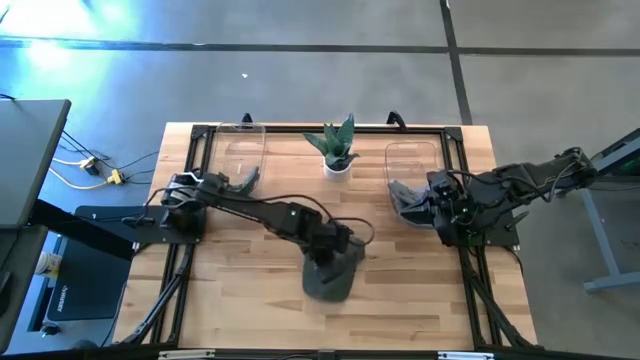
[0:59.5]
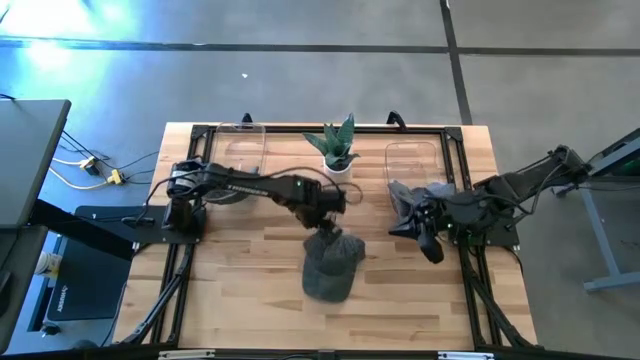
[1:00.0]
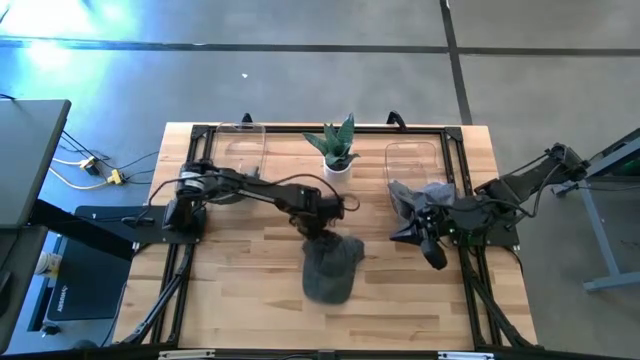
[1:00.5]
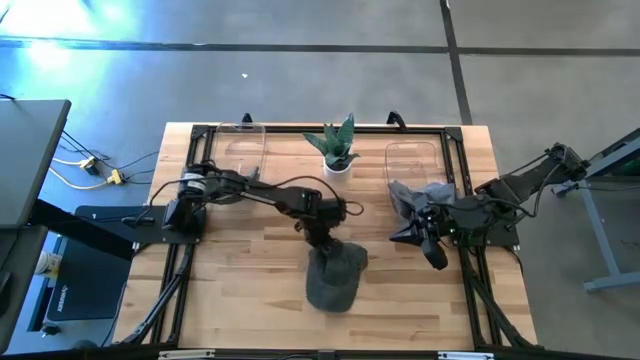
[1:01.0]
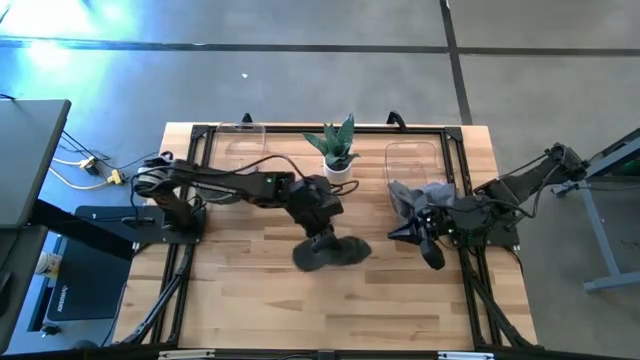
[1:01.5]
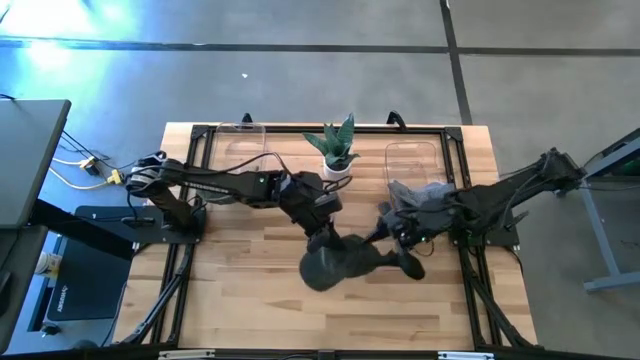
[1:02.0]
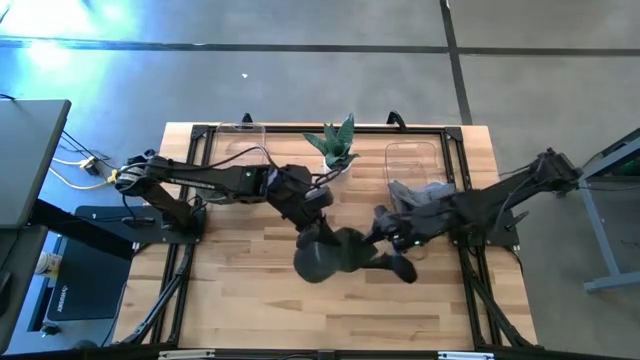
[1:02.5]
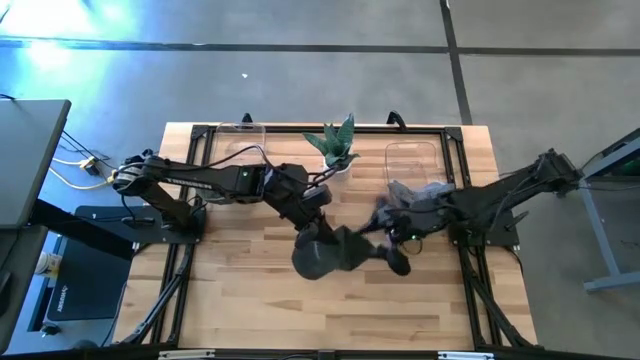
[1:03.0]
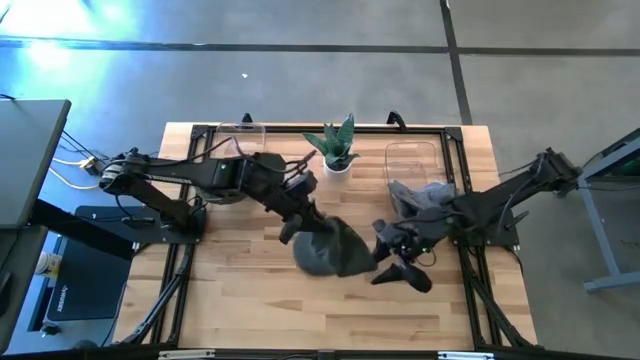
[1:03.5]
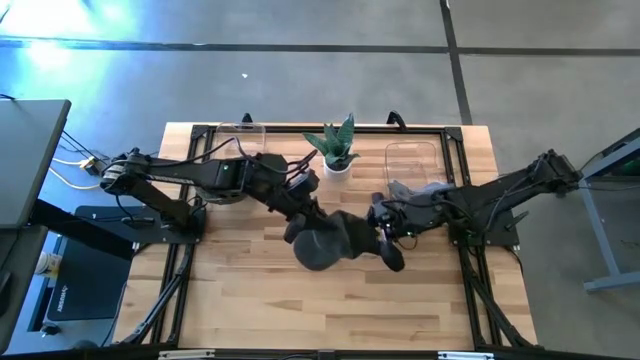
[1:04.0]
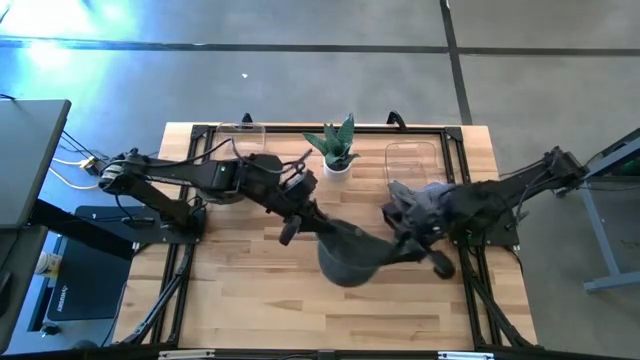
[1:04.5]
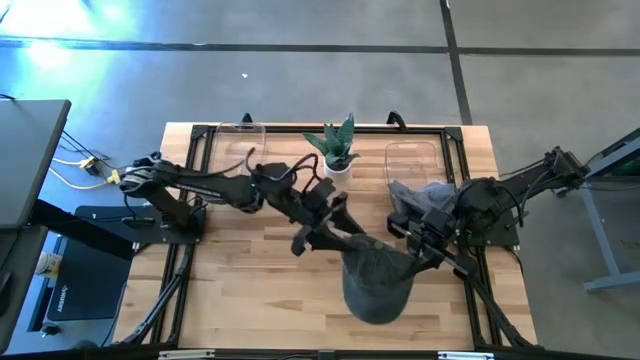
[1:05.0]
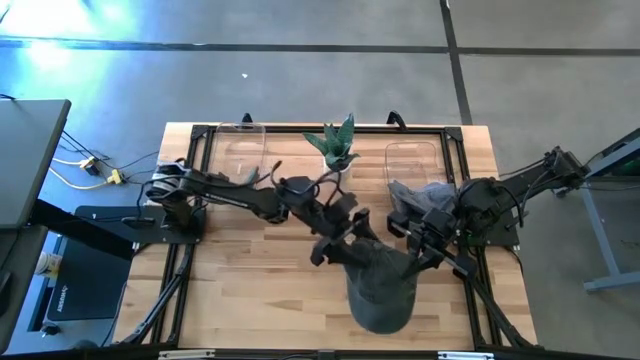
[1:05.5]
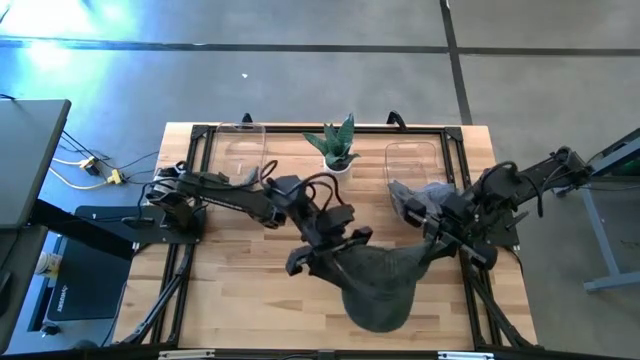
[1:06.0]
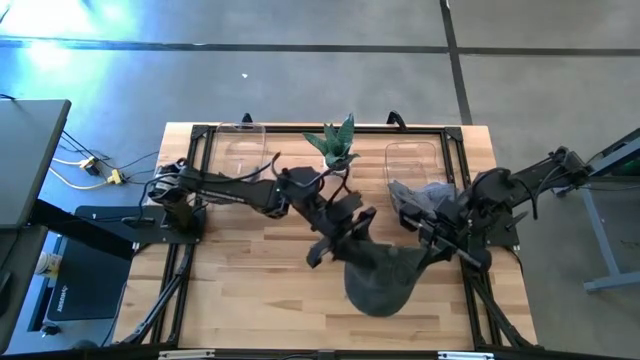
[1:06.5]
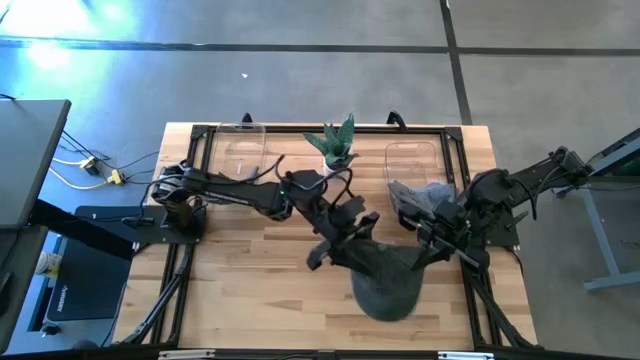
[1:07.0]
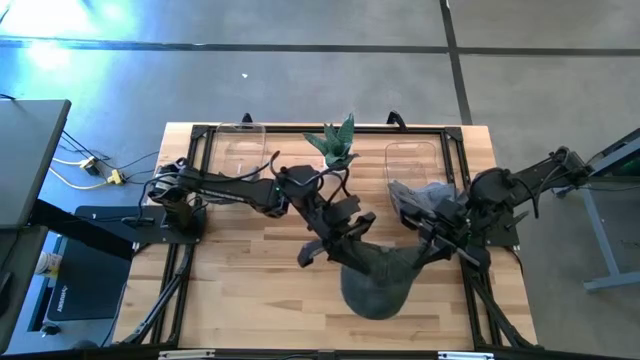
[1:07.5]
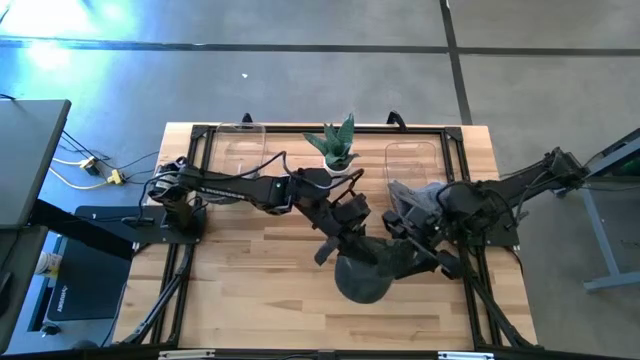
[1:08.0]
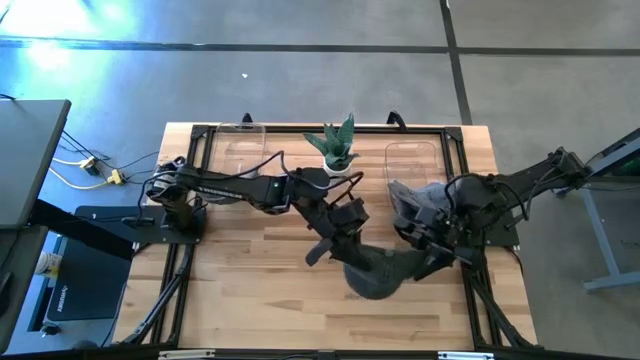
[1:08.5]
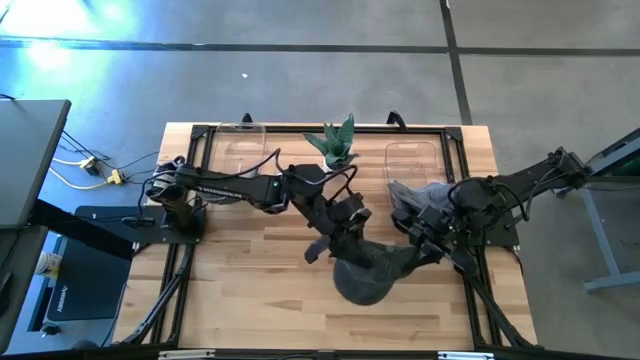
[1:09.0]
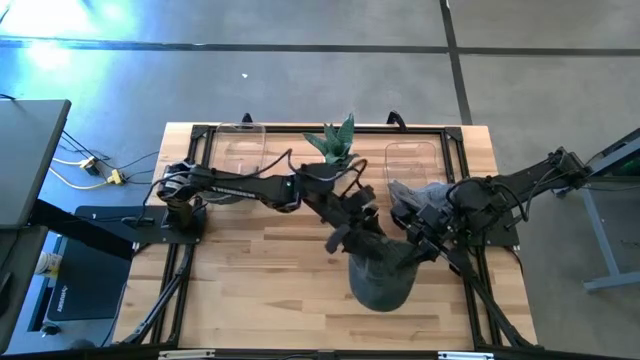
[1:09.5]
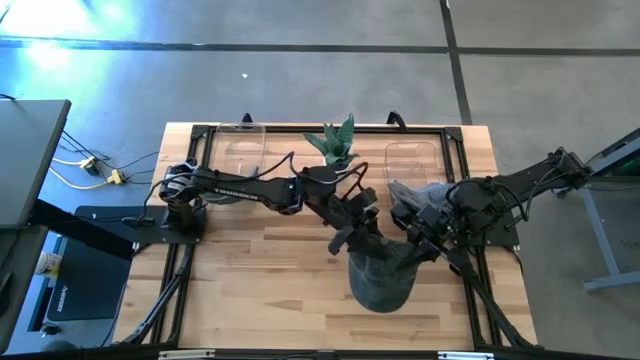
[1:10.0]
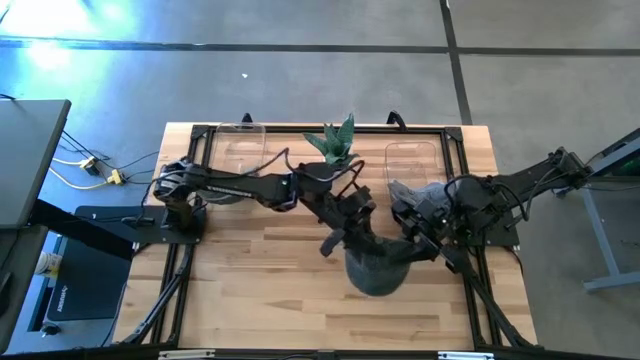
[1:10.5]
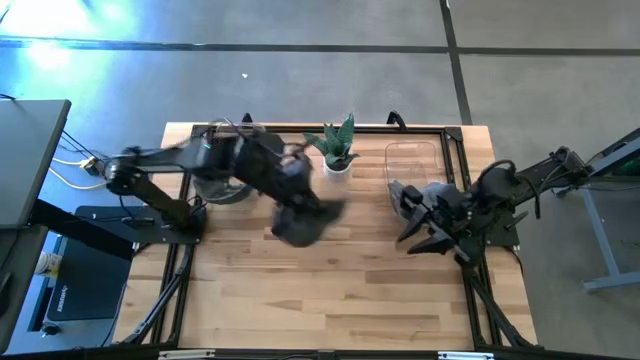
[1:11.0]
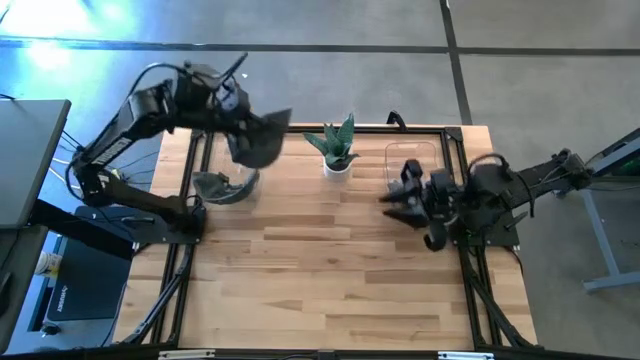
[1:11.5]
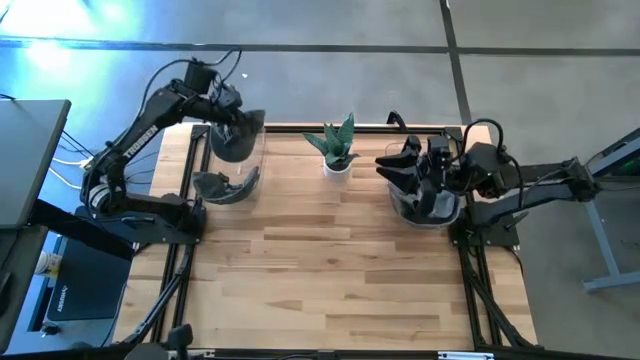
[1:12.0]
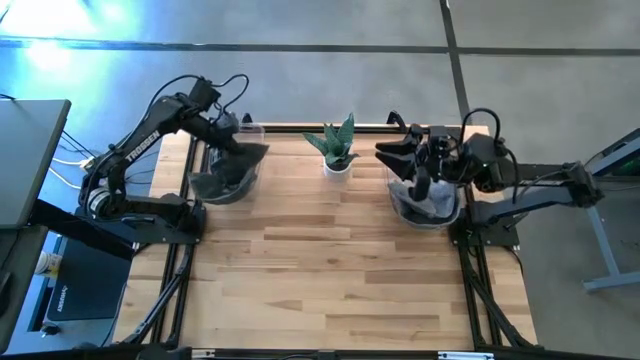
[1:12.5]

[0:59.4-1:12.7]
Task: Pick & Place hat
Put the green cap into the left bin

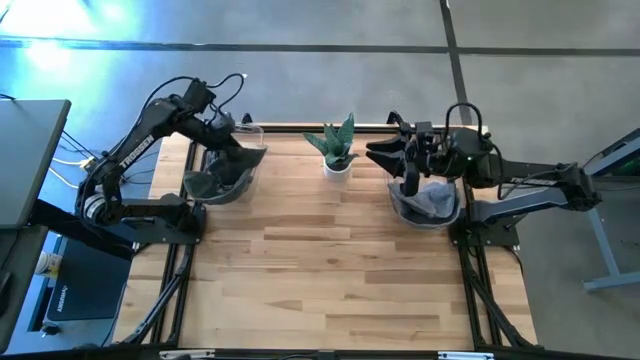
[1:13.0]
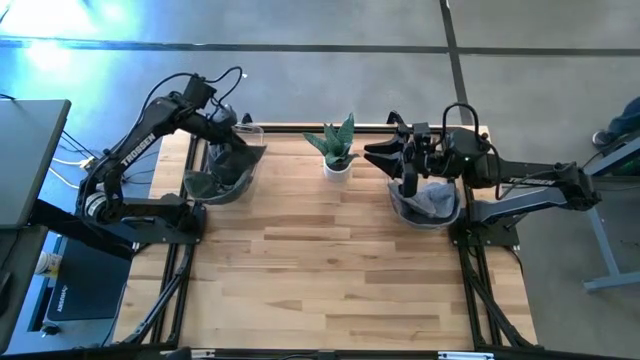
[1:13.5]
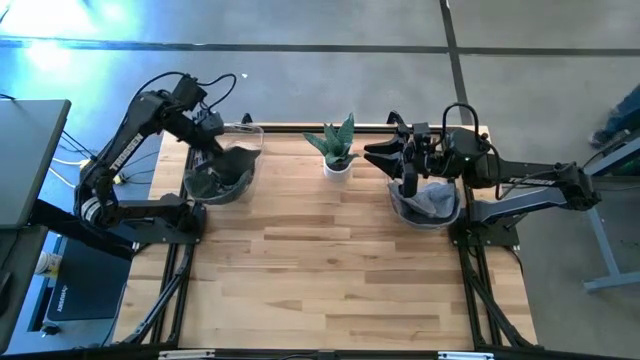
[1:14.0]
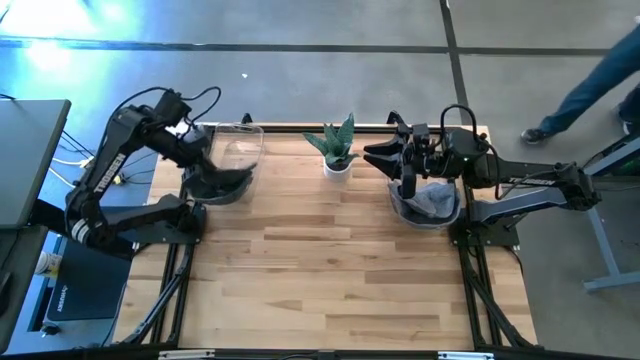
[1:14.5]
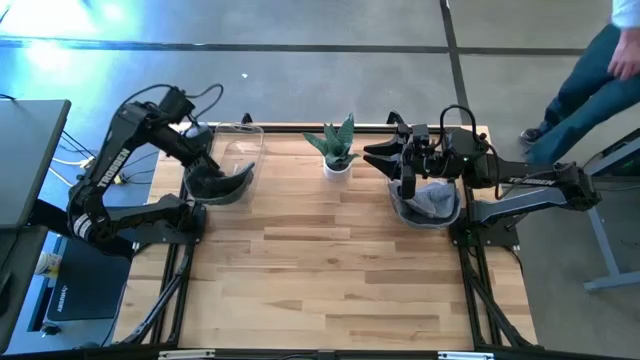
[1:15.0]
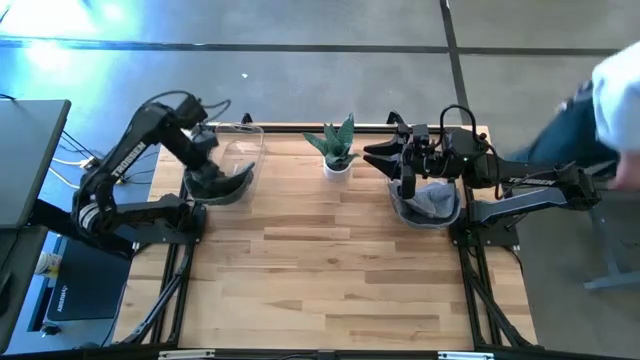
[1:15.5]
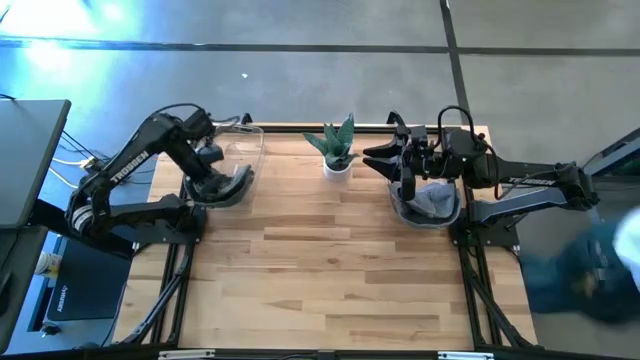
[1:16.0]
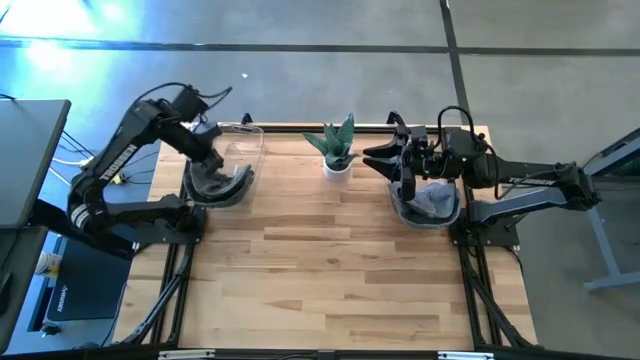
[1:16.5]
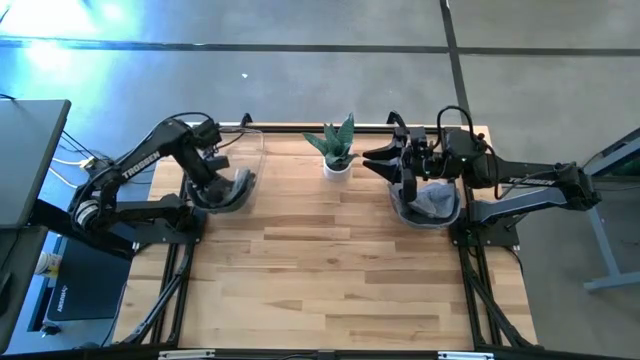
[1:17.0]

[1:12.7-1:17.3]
Adjust the caps in the left bin

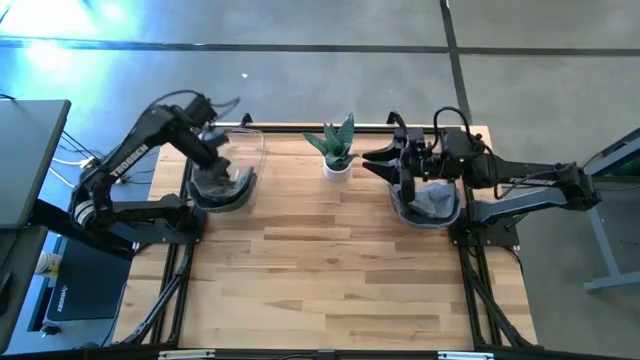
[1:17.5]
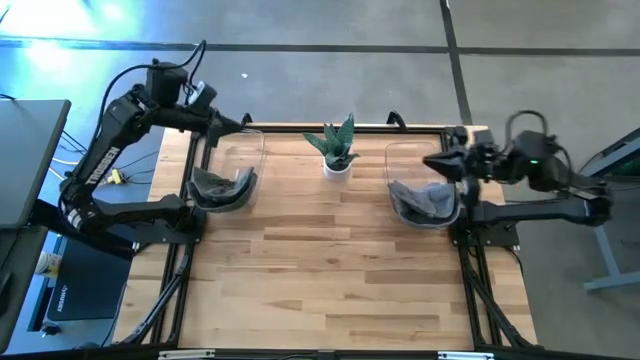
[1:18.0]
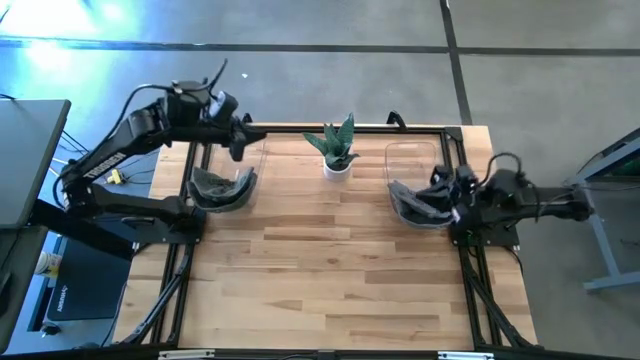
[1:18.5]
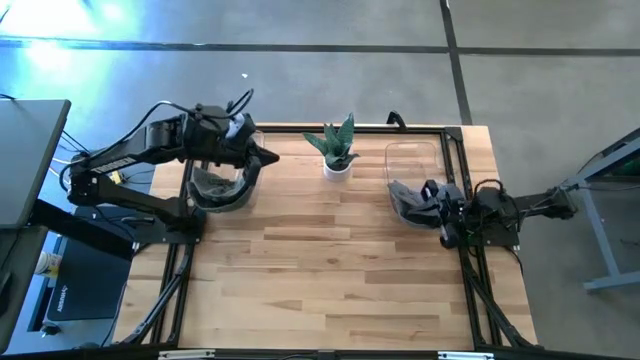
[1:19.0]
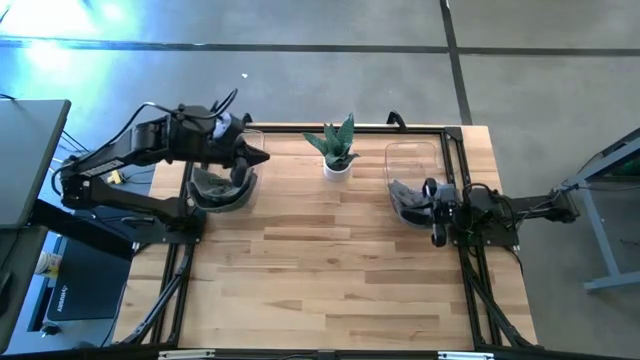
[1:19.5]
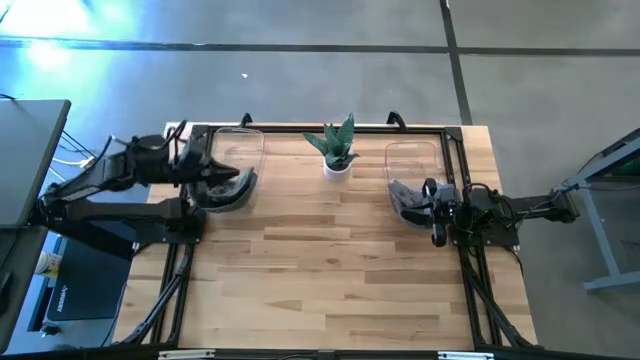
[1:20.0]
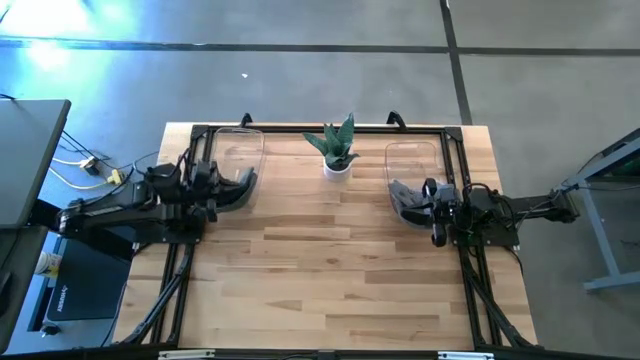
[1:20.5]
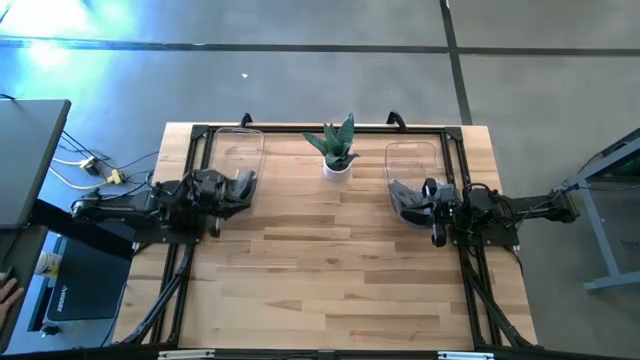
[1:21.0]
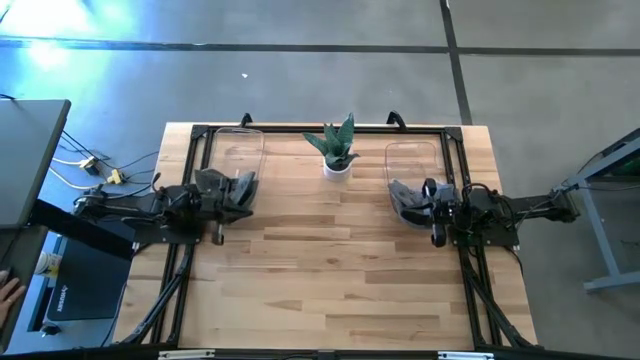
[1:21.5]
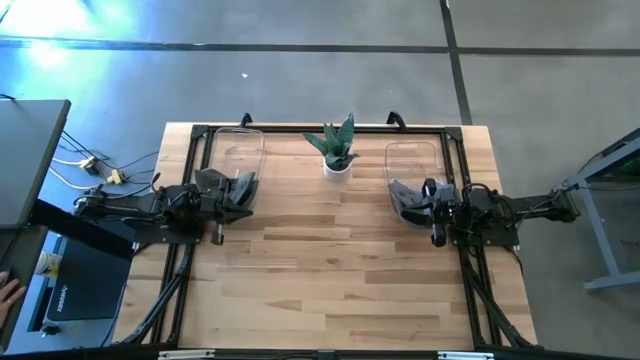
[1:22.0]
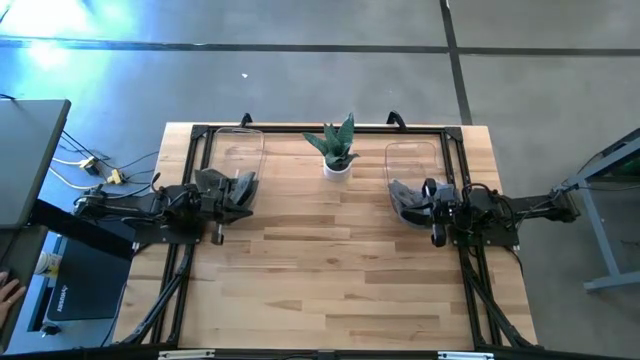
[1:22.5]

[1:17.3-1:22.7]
Return to Home Position
